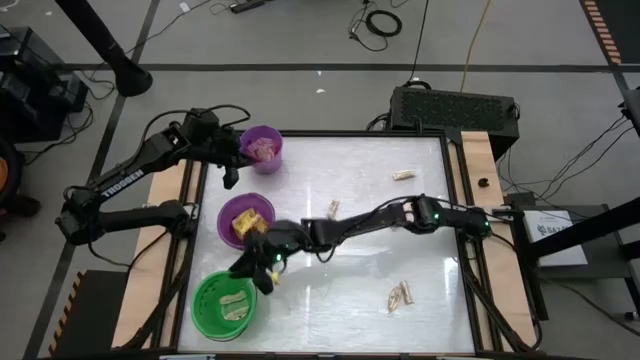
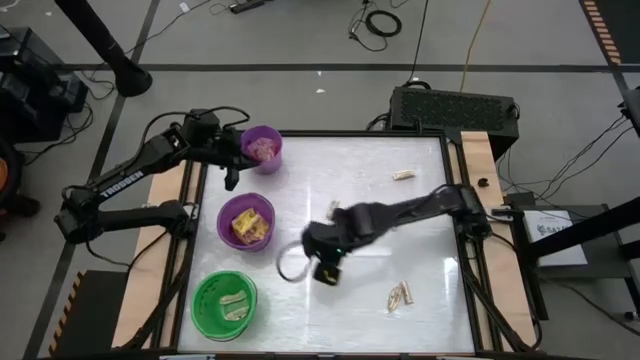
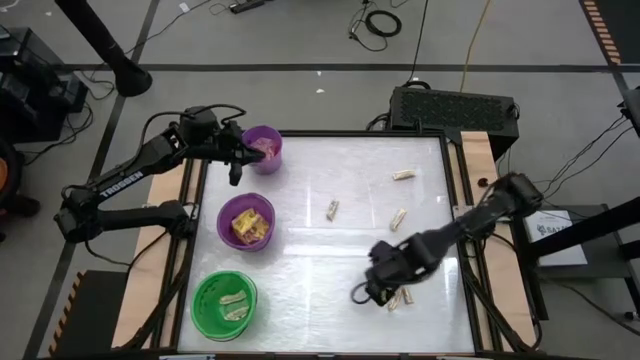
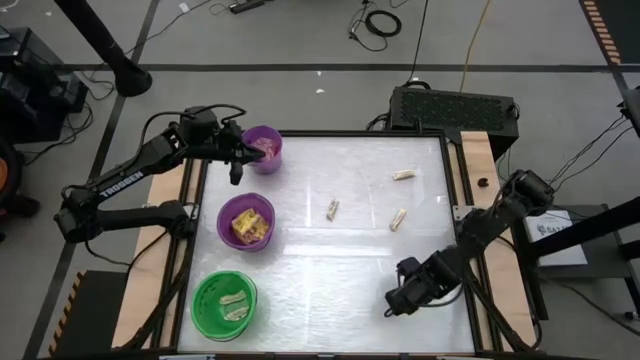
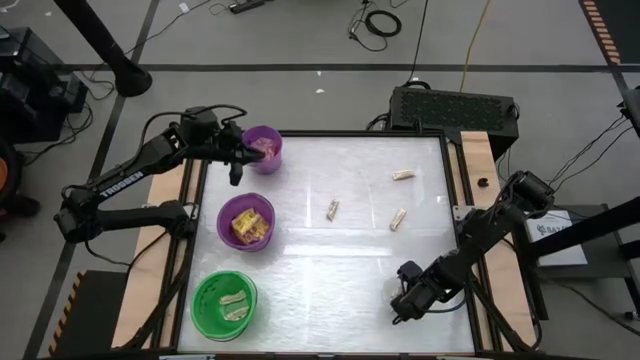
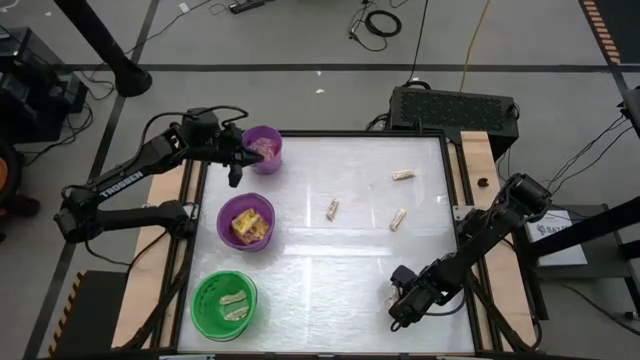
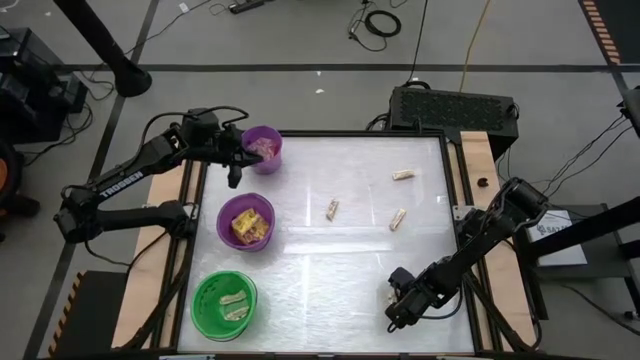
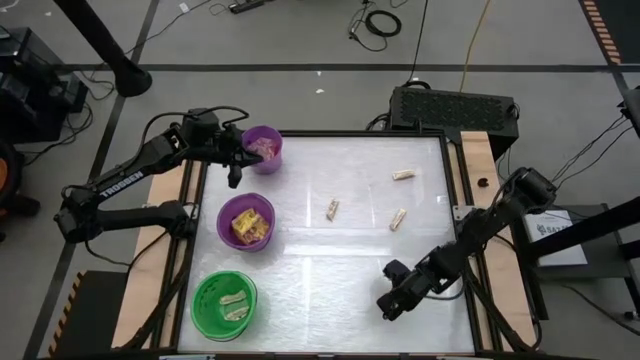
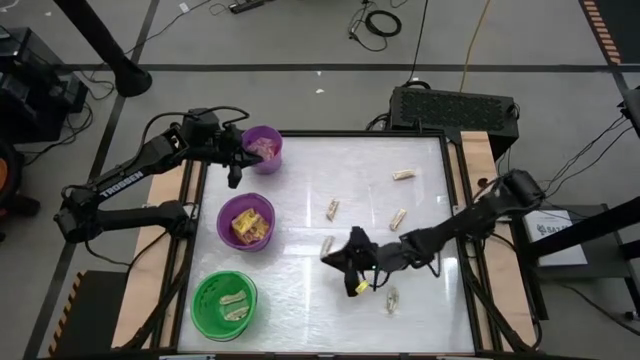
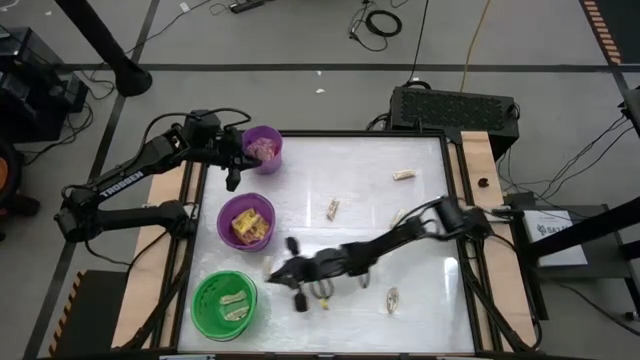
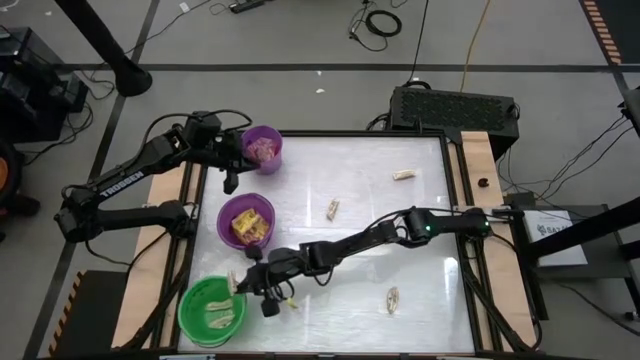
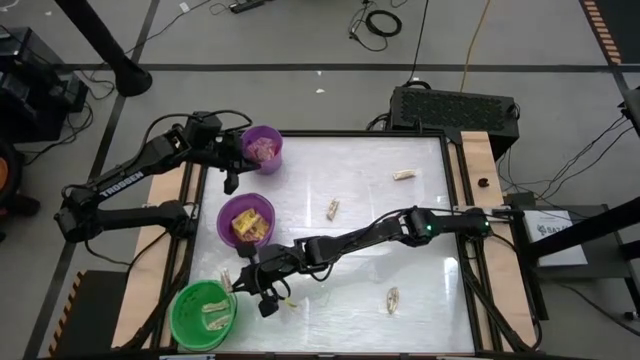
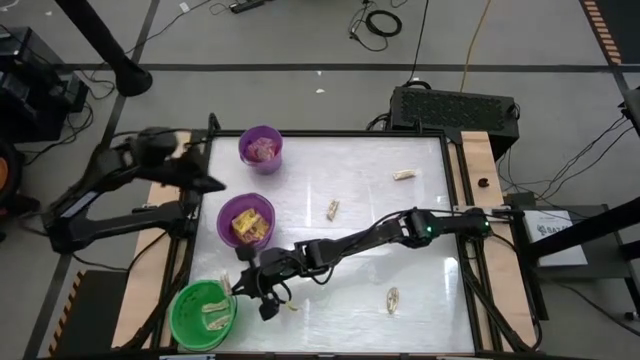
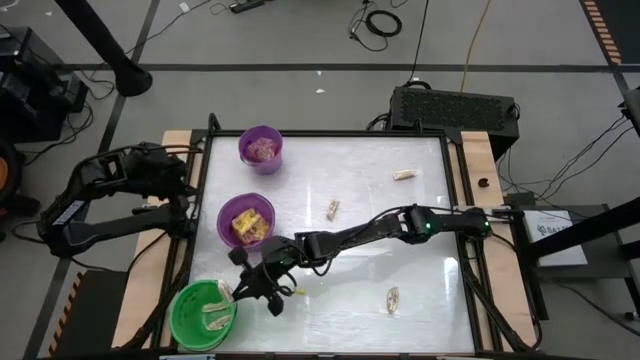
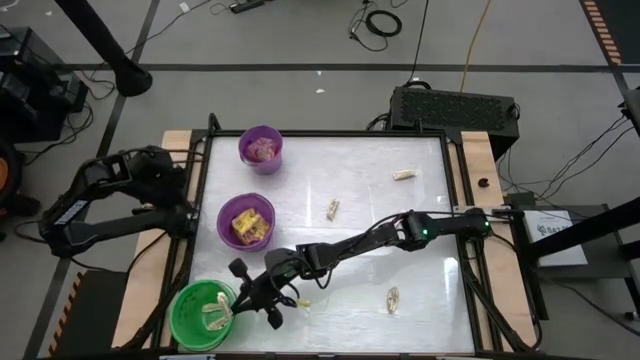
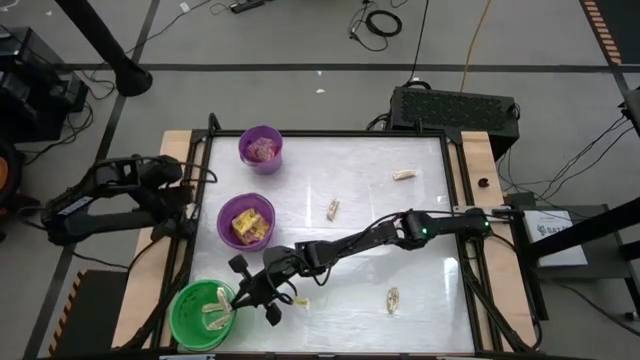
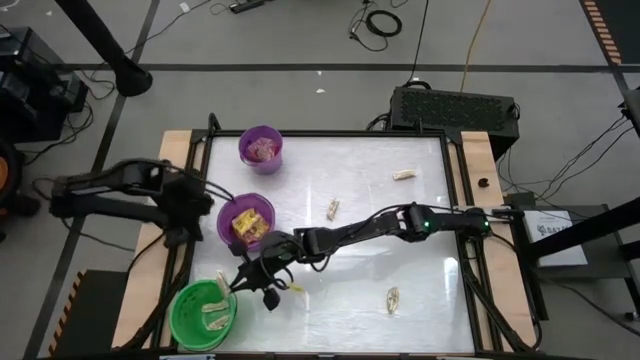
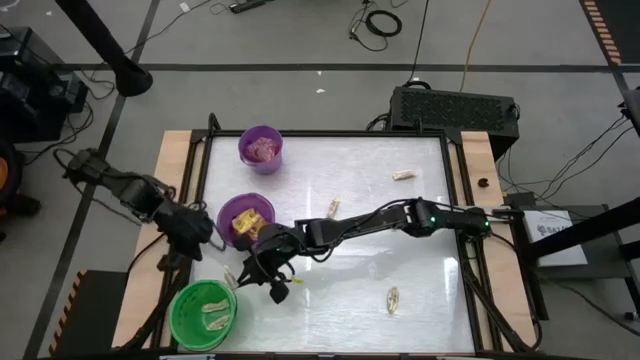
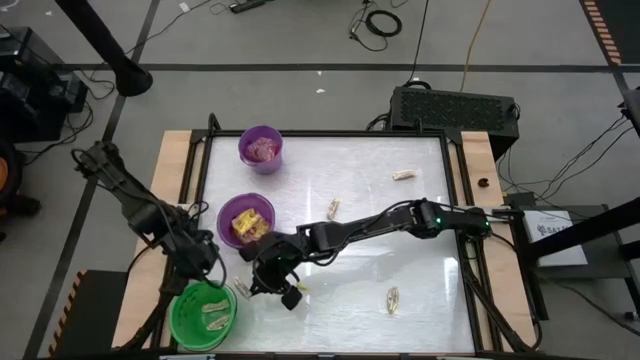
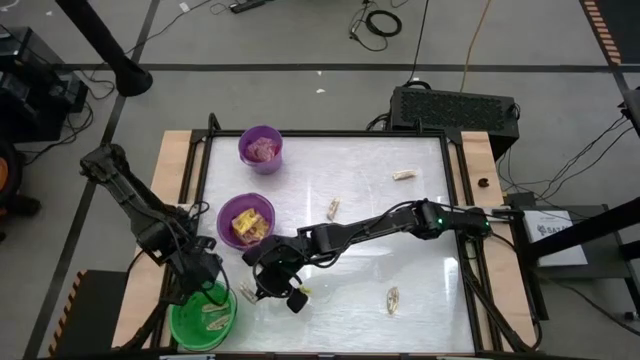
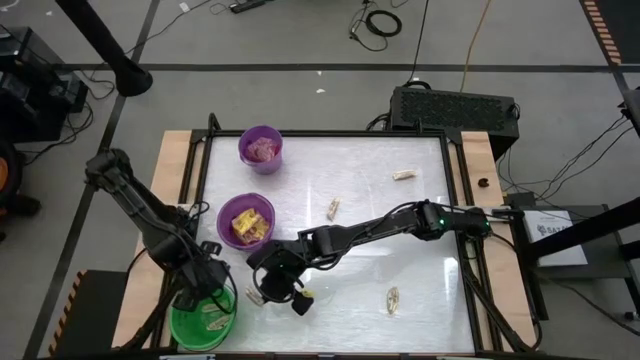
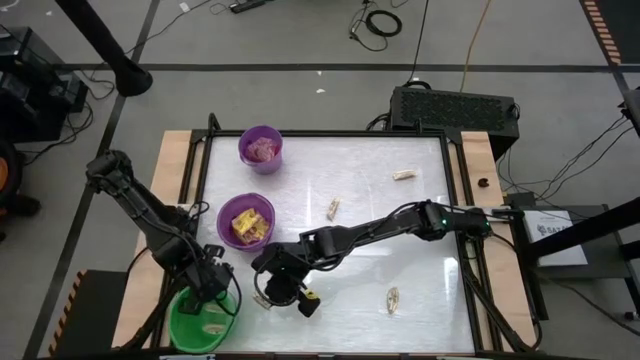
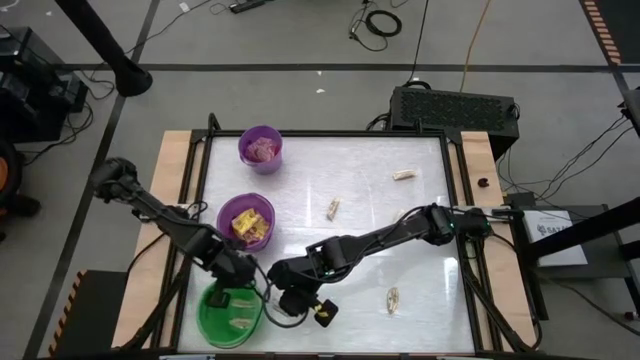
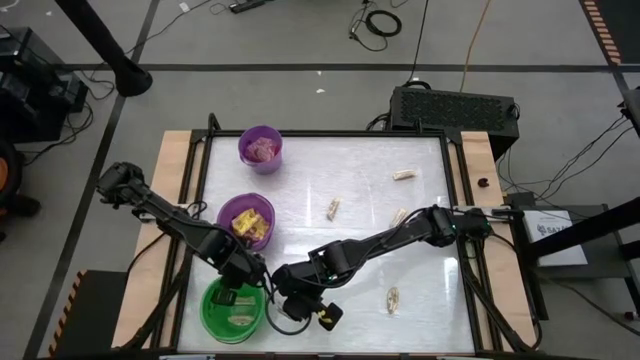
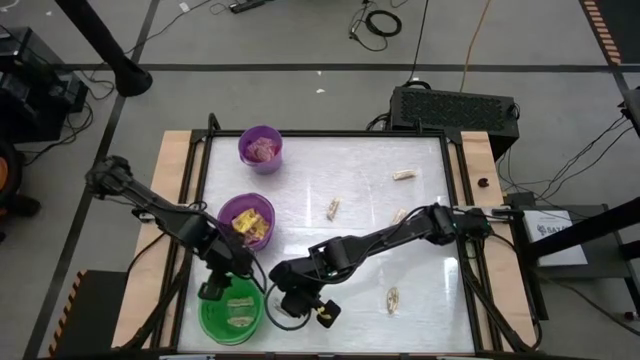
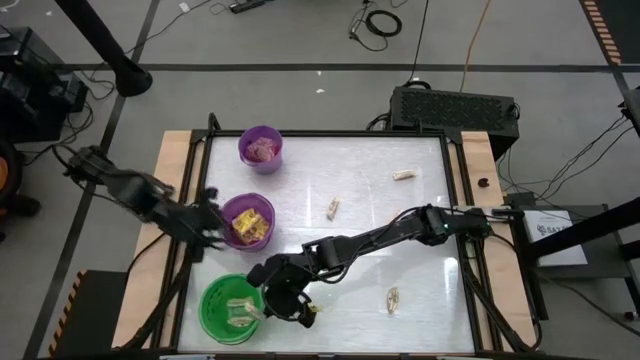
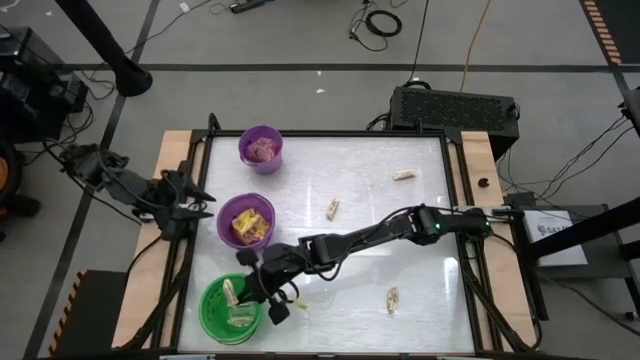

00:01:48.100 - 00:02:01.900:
Task: Sort candy by brand, put in halloween buckets
Put the white candy into the green bucket

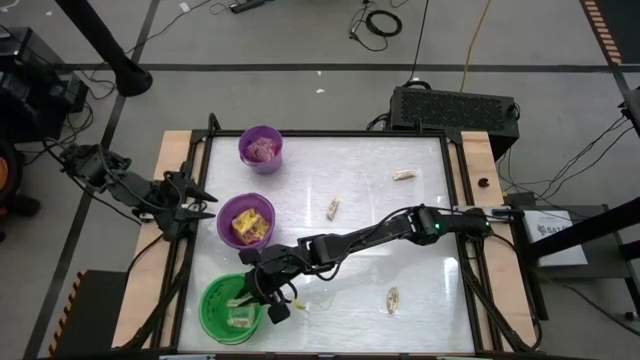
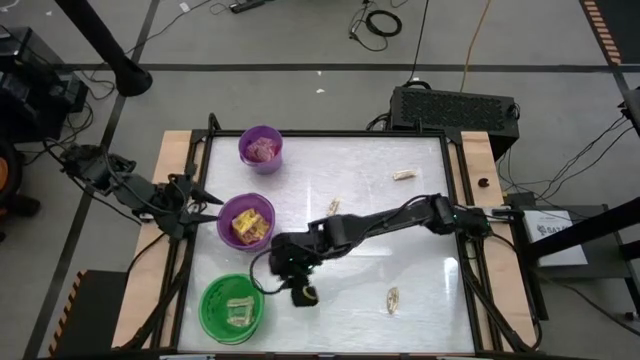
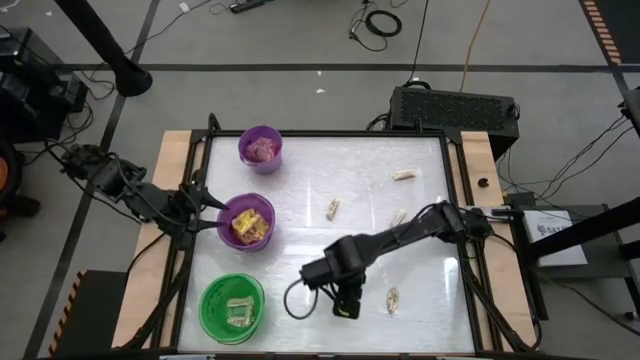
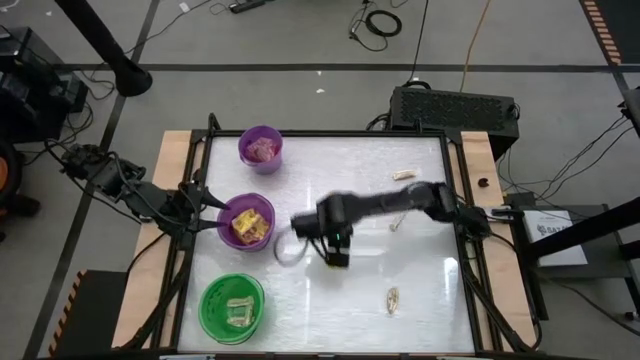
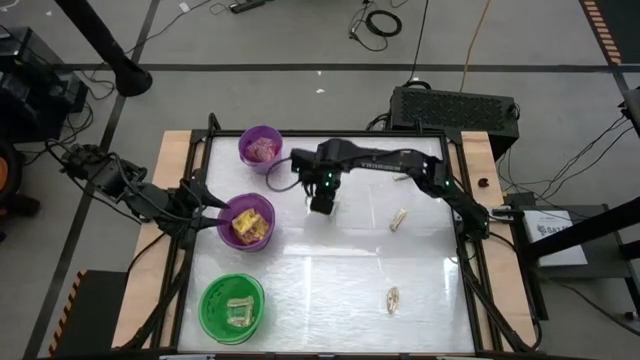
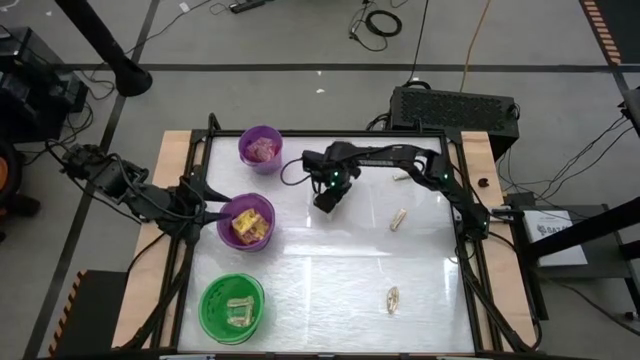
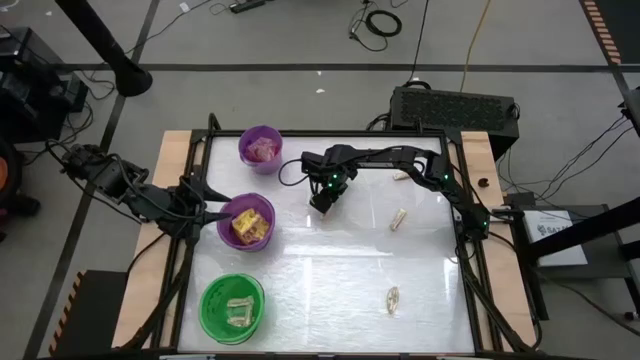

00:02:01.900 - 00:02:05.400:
Put the white candy into the green bucket

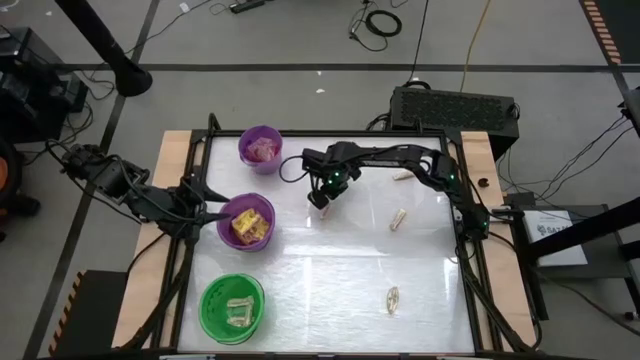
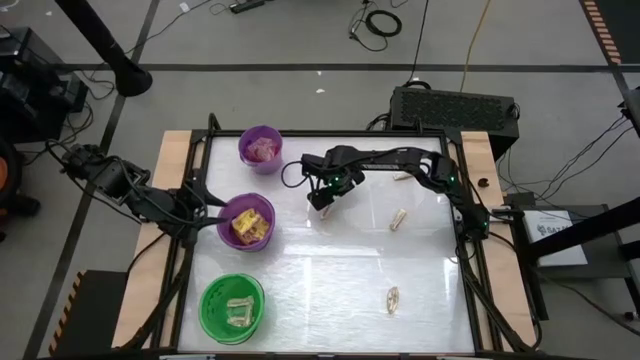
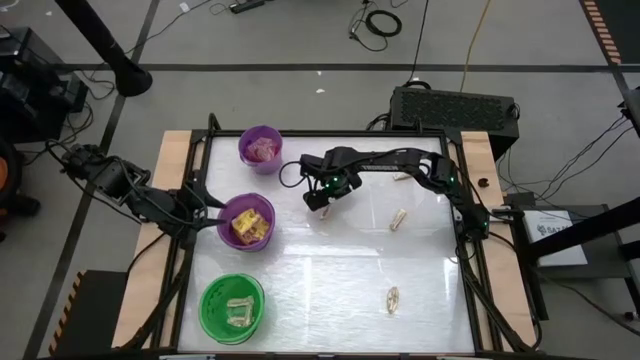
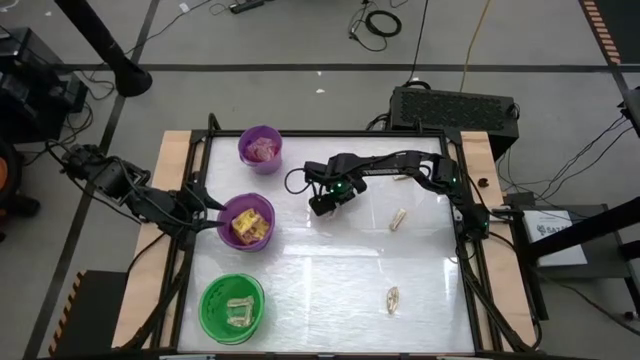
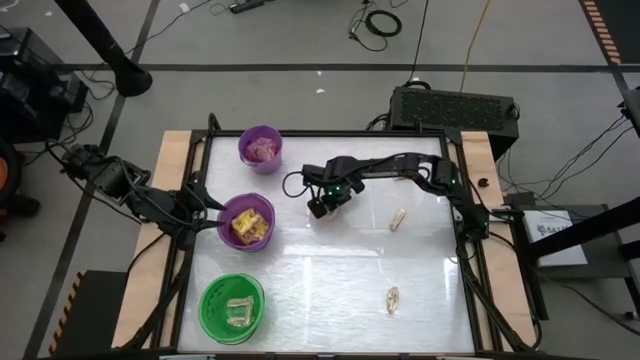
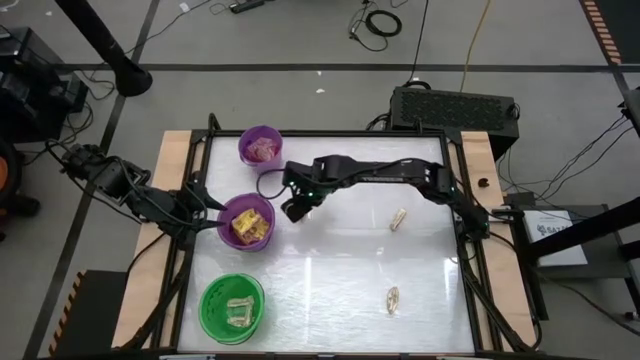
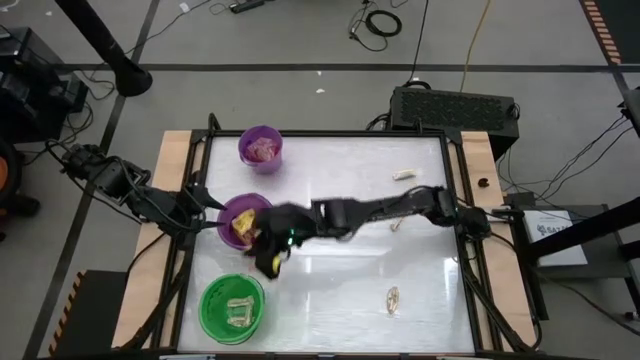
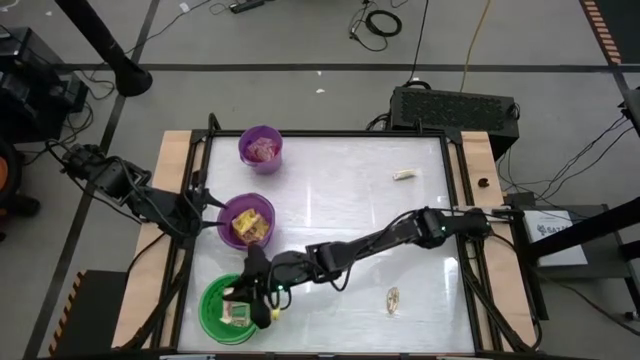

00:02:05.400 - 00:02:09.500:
Put the white candy into the green bucket
